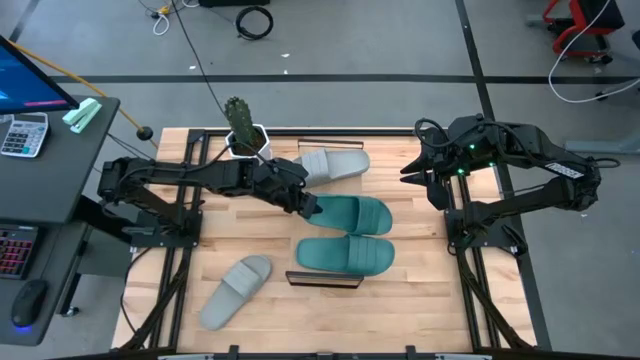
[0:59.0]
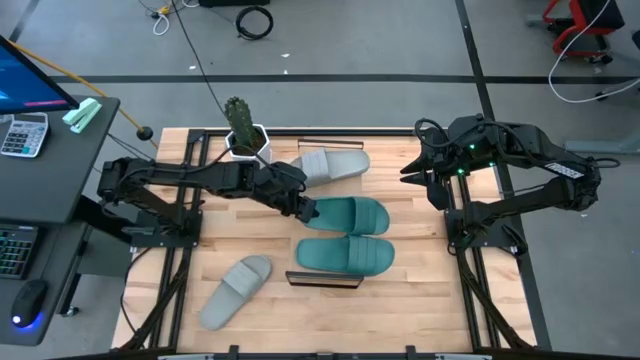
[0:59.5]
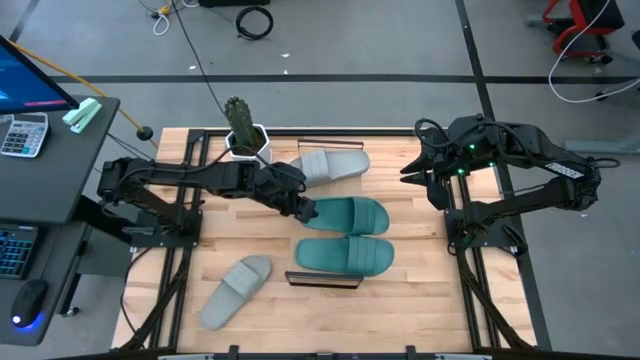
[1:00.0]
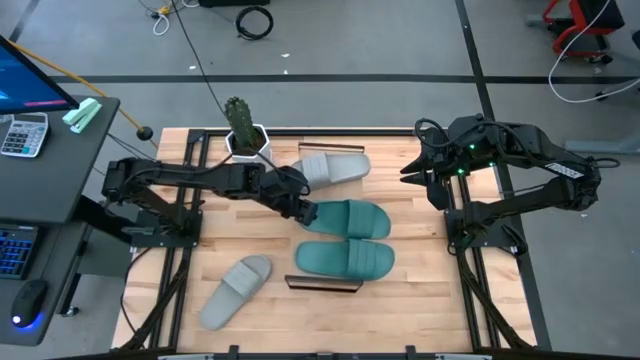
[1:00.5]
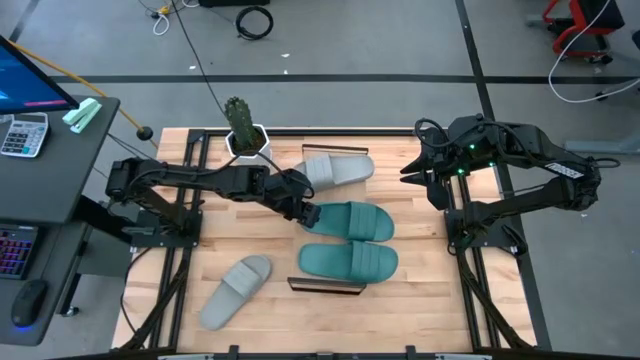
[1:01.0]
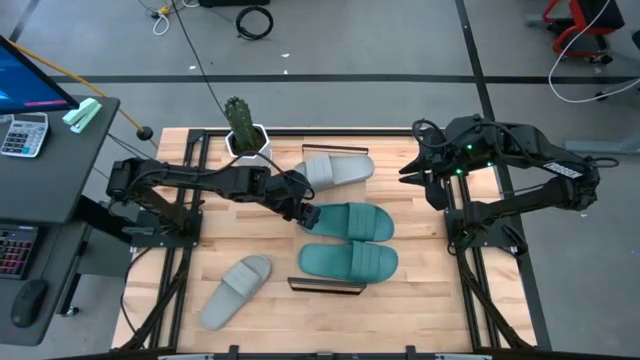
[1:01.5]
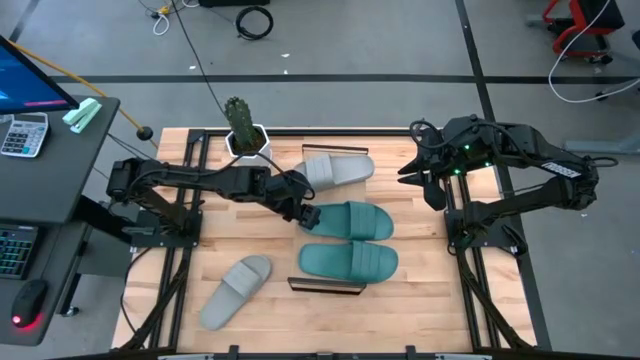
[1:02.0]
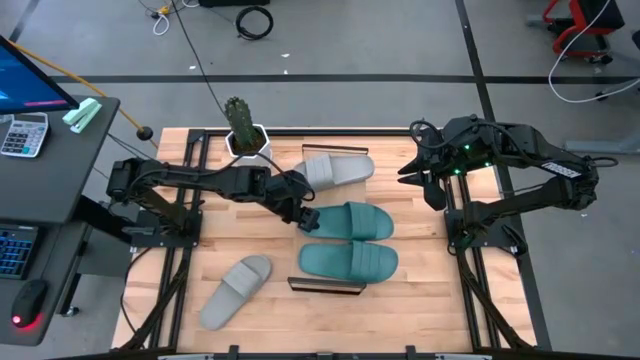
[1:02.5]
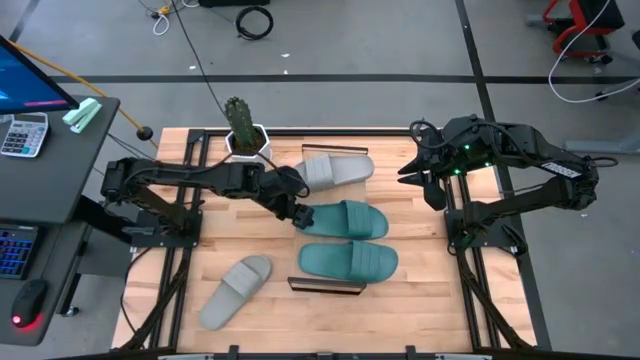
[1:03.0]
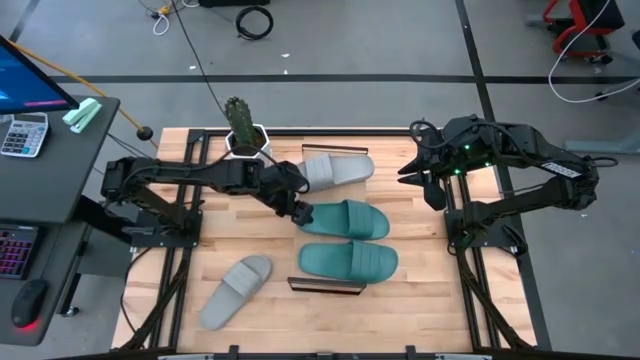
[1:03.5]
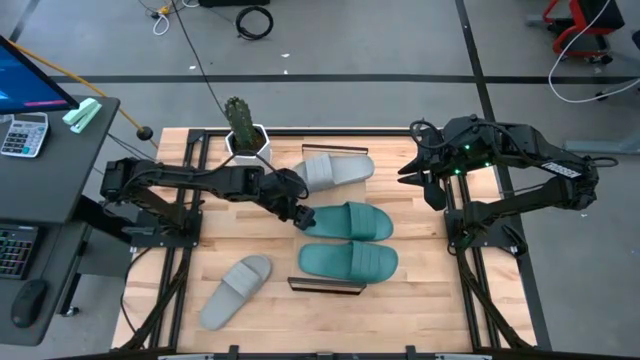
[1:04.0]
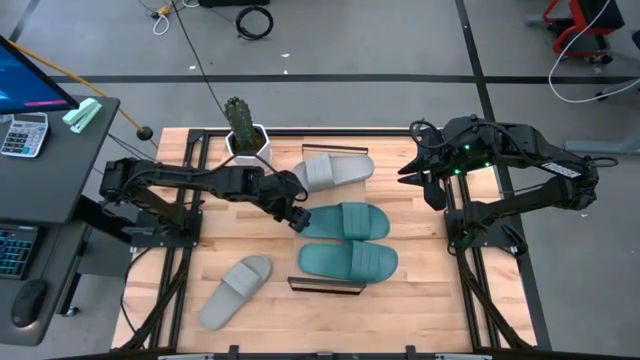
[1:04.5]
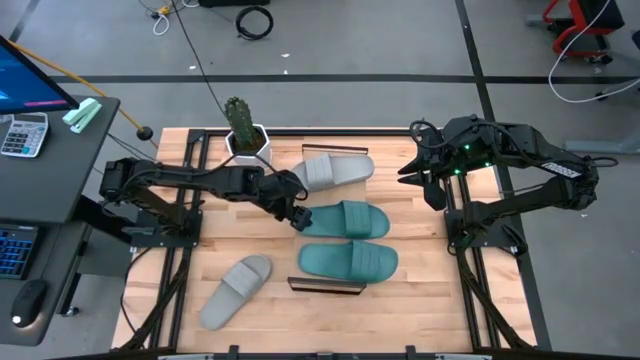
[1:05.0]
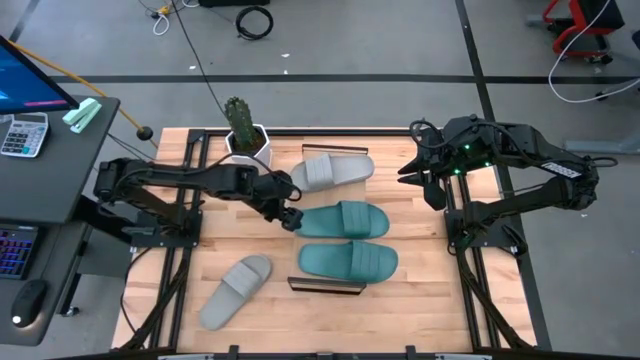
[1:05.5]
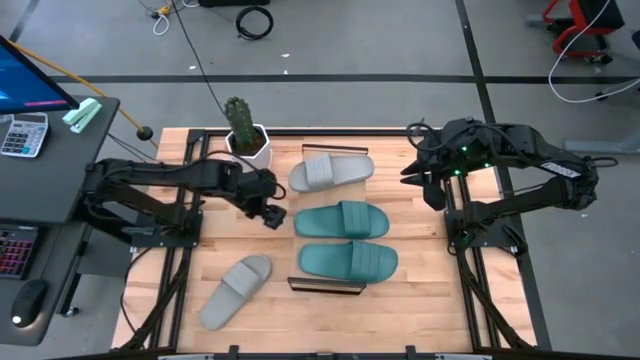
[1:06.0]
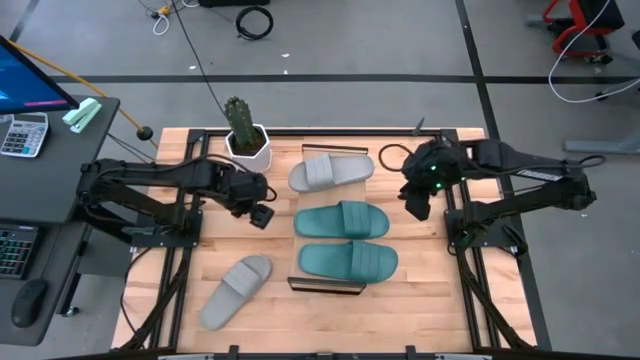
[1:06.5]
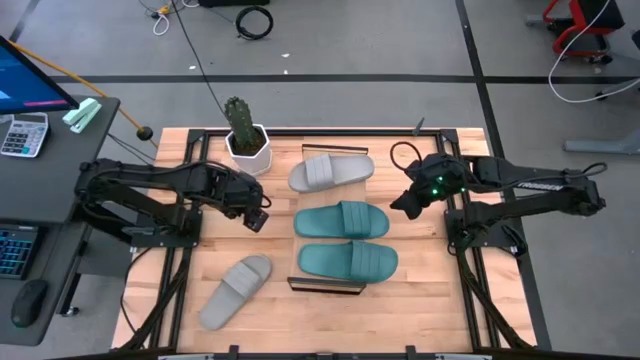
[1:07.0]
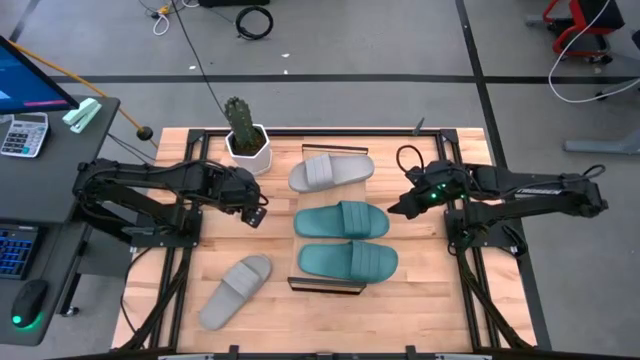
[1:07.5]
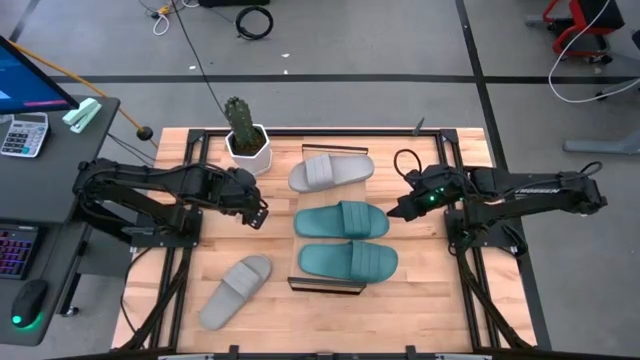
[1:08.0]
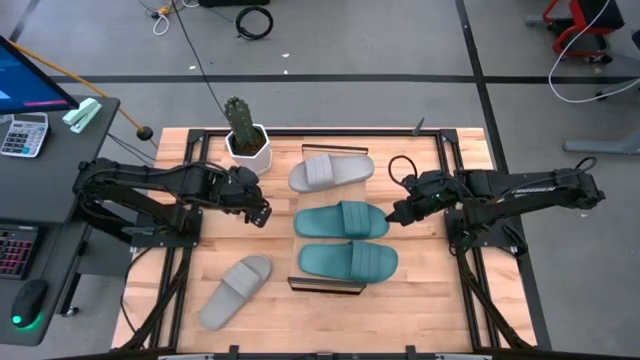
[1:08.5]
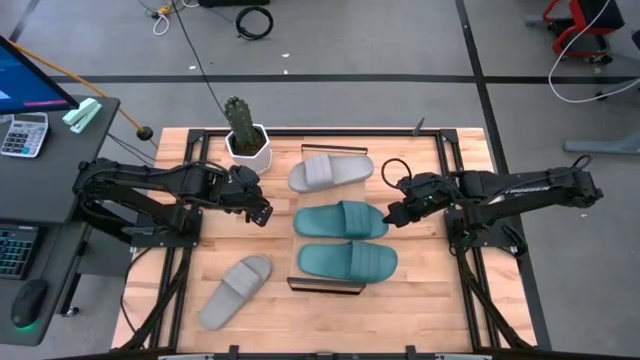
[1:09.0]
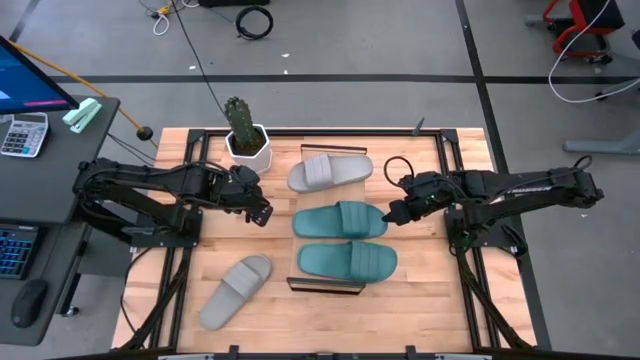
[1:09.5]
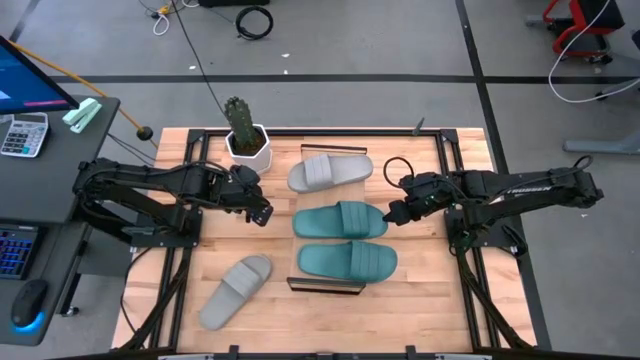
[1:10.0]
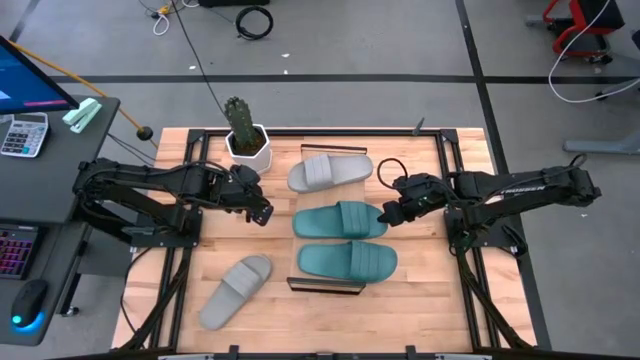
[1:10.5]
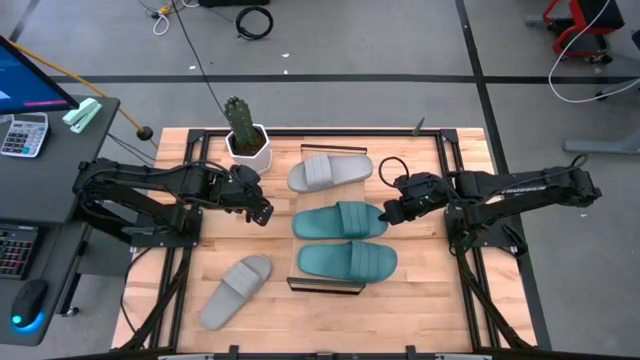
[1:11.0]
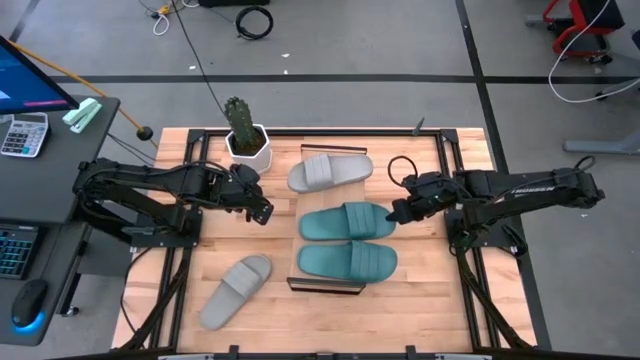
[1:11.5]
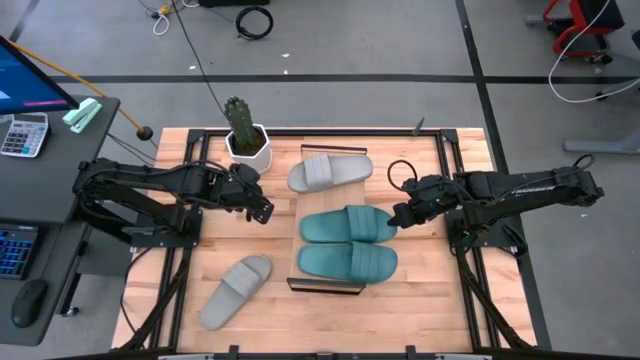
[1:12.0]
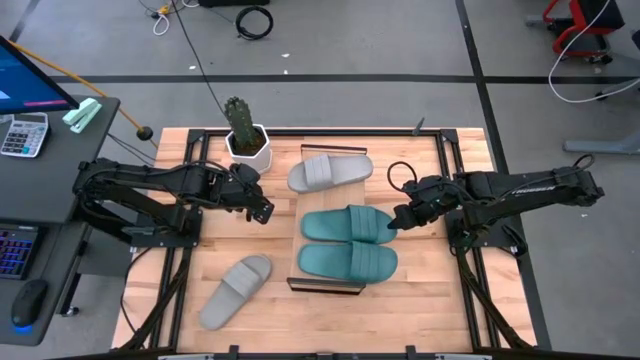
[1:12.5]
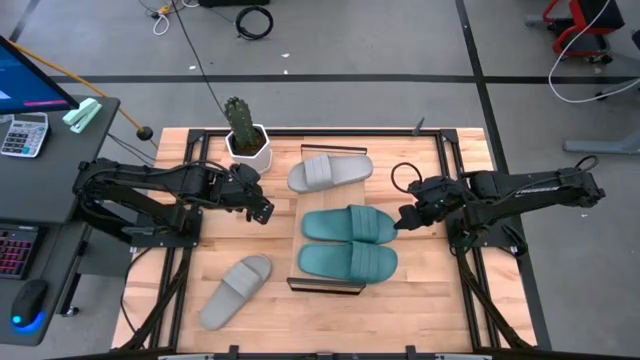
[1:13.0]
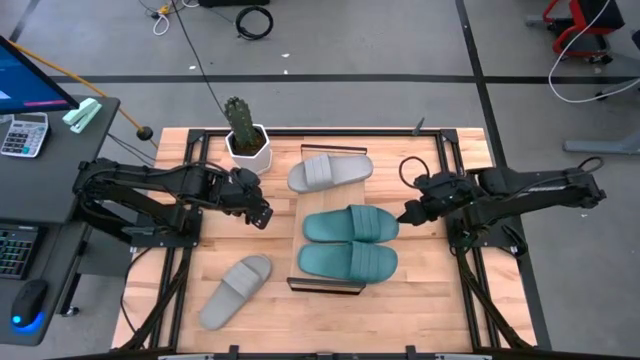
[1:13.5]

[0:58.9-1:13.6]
Task: Pick and place slides into the shelf
Put the blue slipper on the shelf

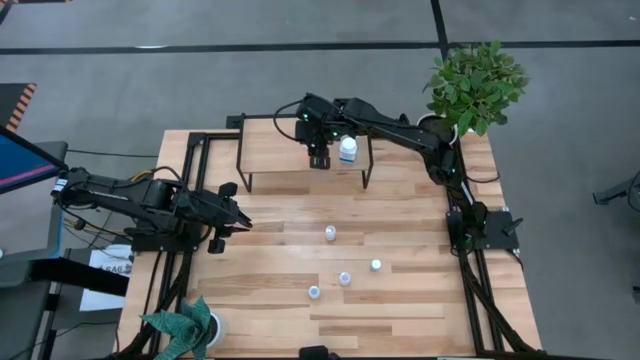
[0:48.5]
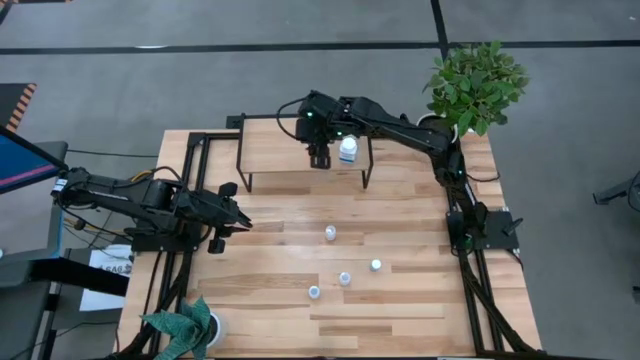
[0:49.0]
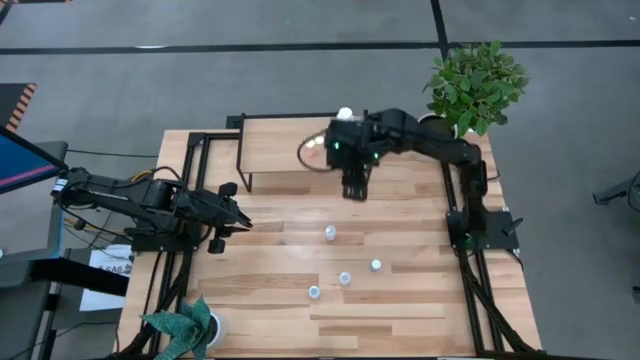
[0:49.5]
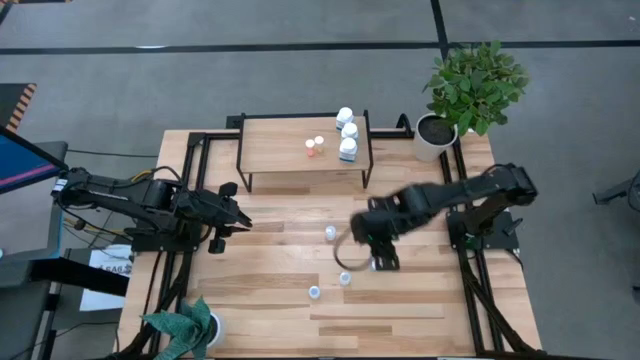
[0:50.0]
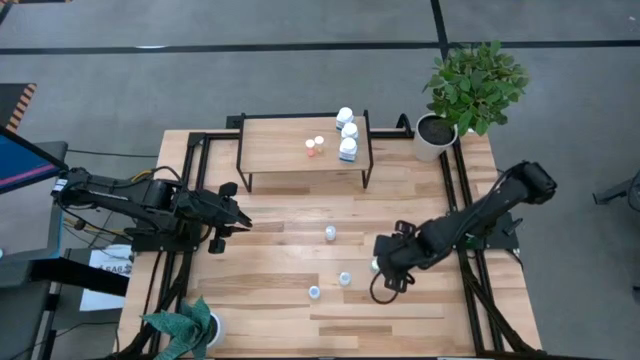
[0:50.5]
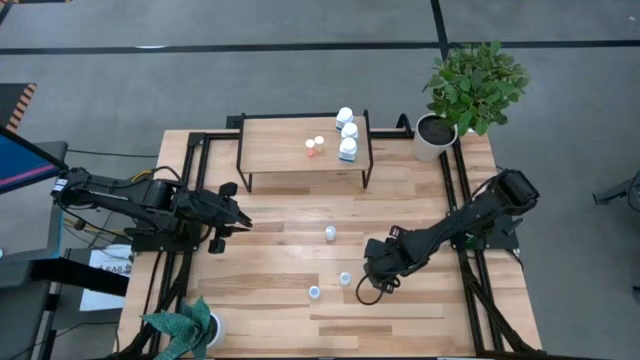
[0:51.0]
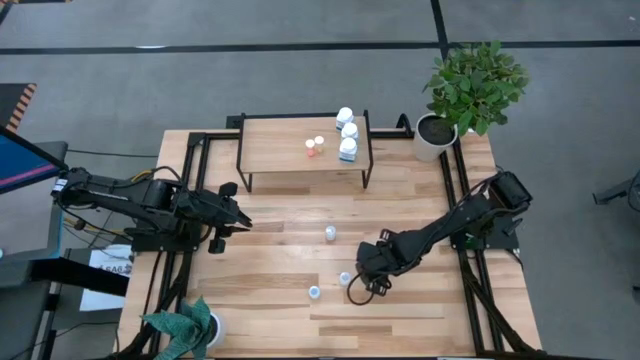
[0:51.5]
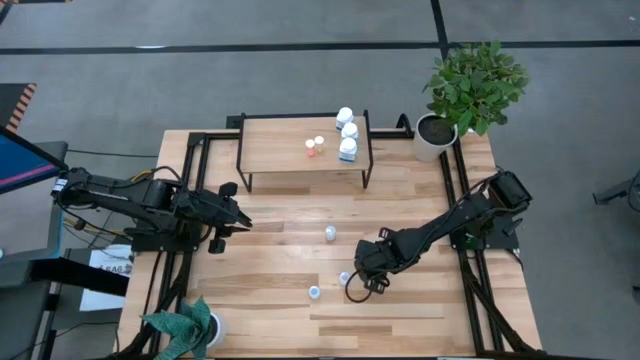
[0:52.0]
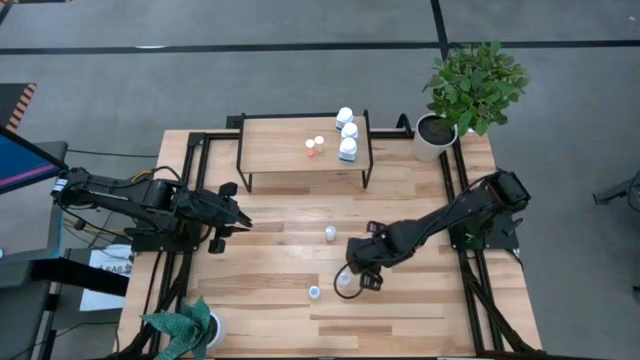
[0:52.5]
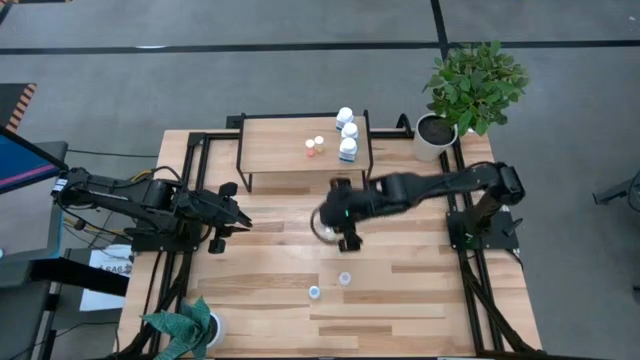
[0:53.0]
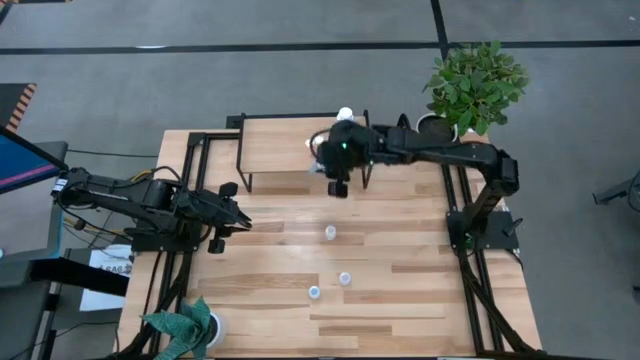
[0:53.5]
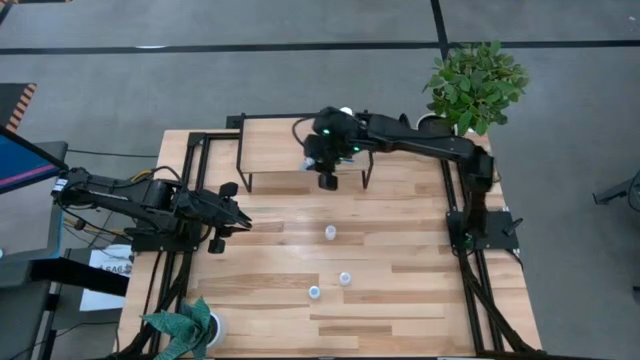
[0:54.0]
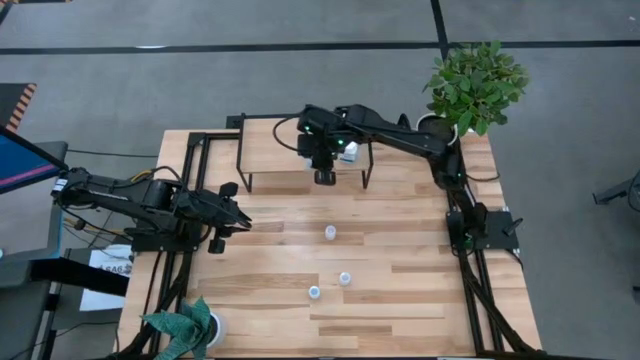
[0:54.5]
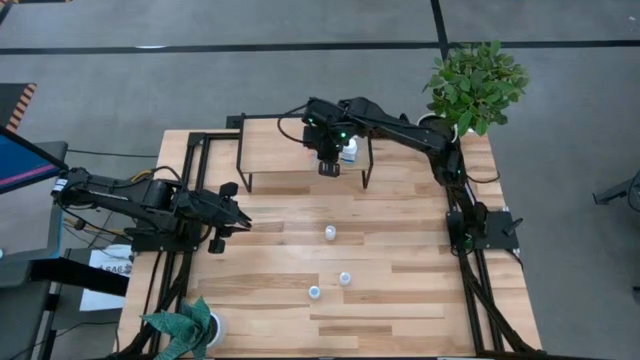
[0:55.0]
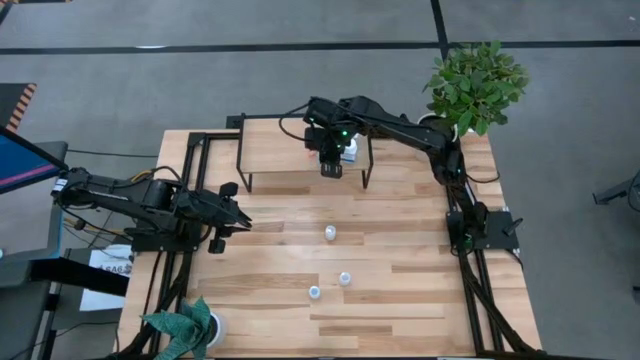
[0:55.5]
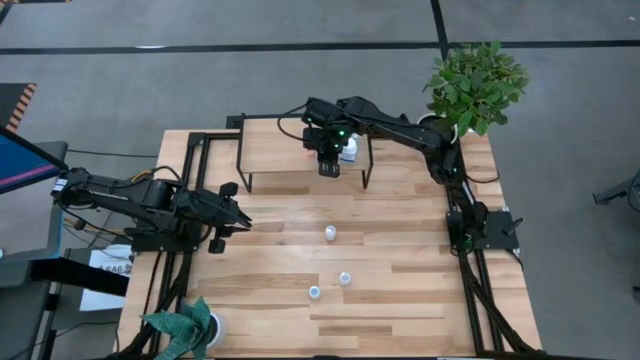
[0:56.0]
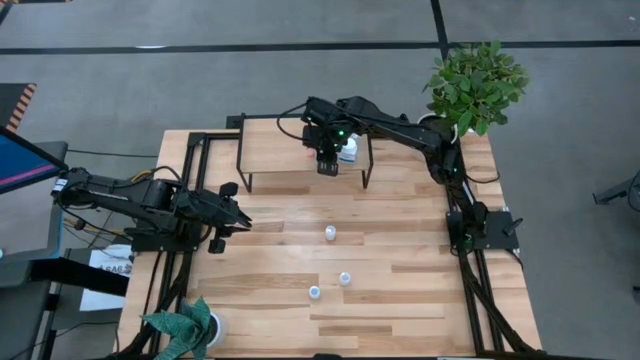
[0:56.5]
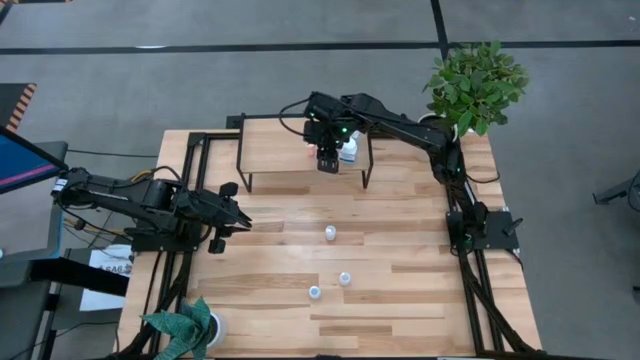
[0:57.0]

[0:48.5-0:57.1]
Task: Pick and place medicine bottles onto shelf by color
Put the blue pill bottle on the shelf
